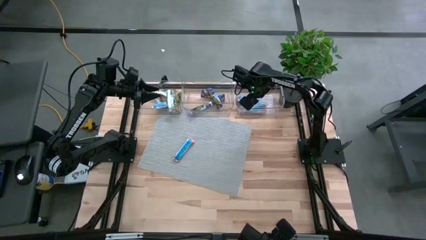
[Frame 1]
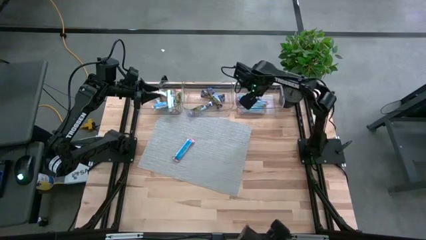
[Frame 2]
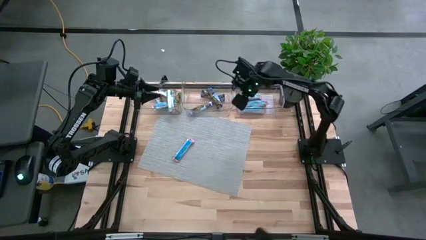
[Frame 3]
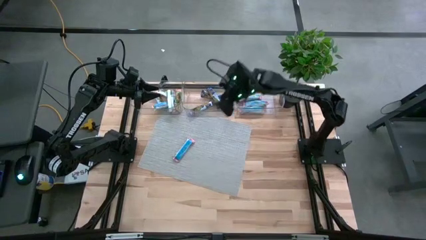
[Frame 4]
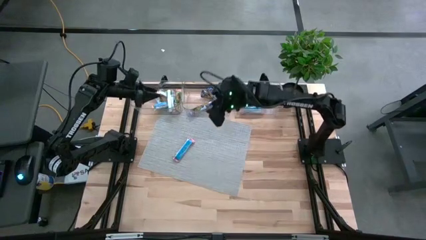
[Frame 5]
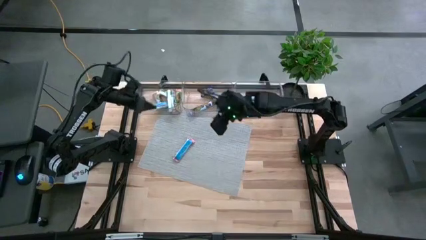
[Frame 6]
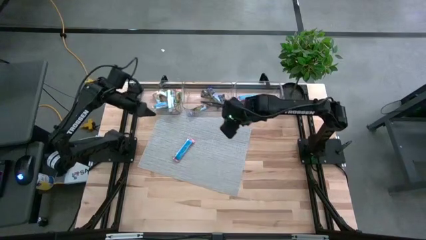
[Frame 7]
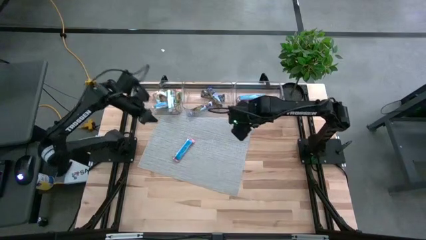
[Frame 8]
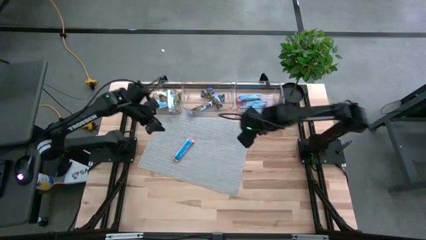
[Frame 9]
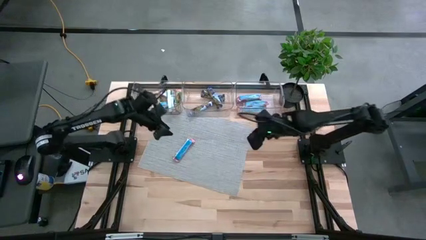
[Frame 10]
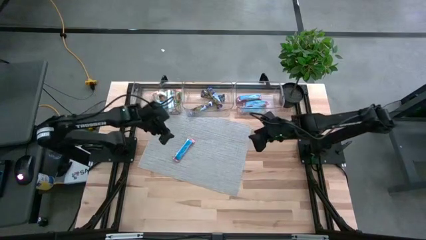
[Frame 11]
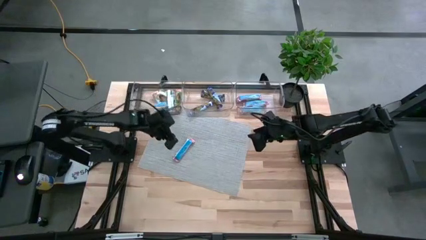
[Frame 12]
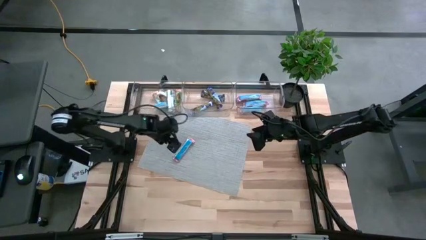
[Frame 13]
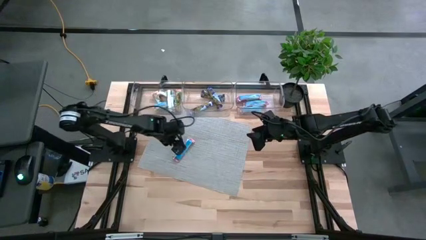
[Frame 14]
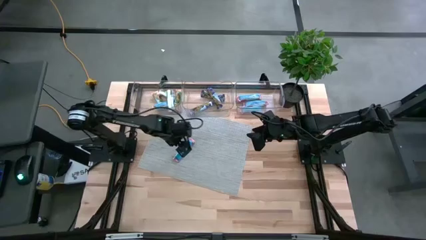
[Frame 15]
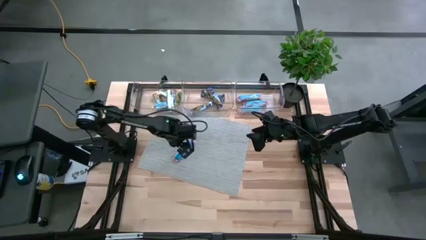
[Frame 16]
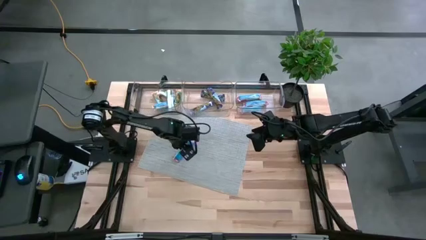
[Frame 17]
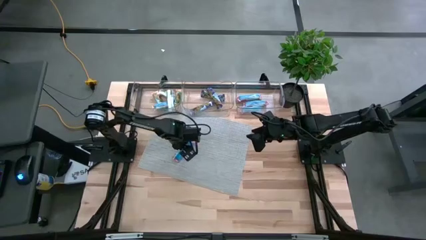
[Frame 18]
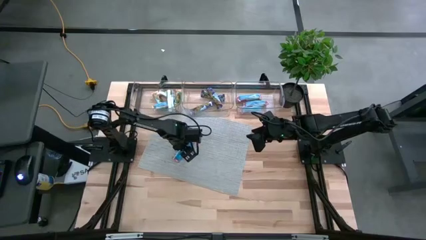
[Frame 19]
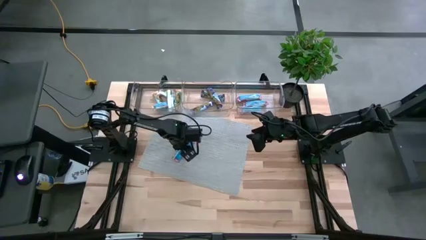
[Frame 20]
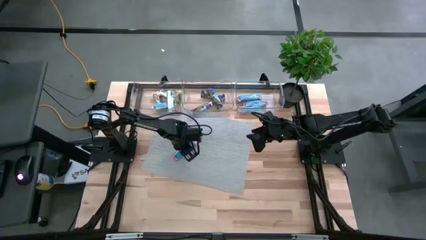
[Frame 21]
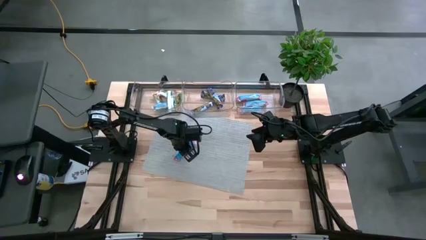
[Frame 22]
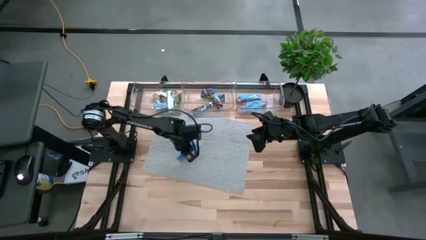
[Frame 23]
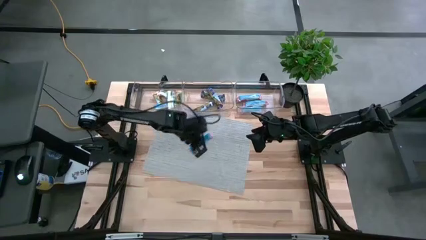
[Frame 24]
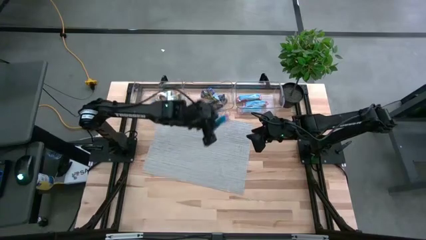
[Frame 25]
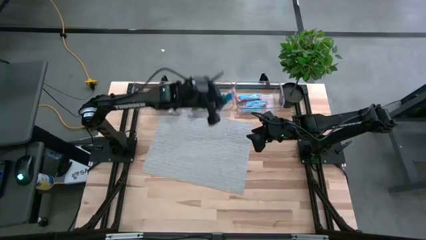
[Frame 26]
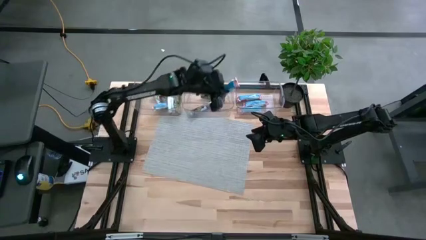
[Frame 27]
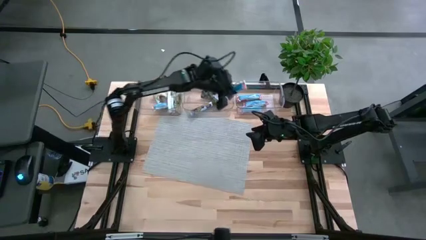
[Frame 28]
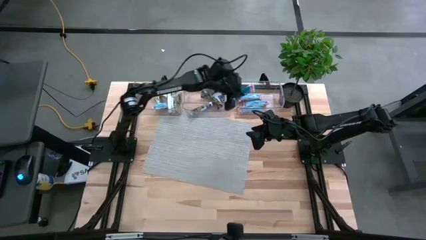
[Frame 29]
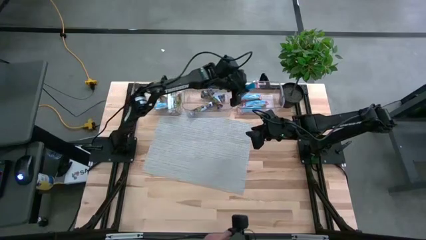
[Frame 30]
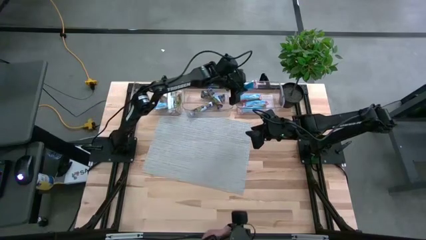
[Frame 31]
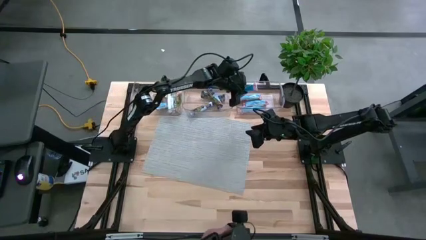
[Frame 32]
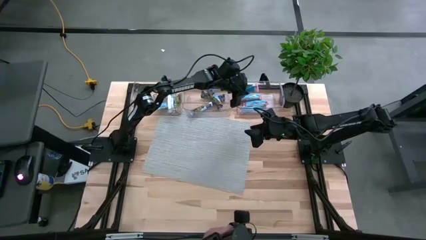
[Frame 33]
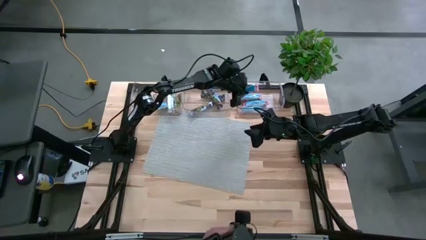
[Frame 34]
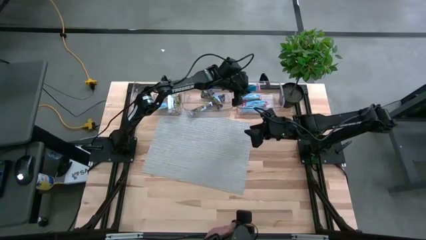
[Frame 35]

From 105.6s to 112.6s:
Task: Pick and place Granola Bars by type
Put the red granola bar into the right transparent bin

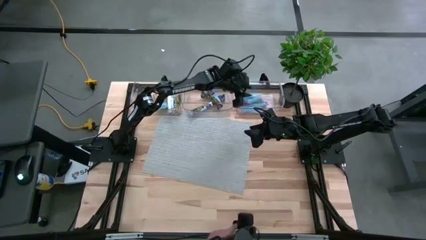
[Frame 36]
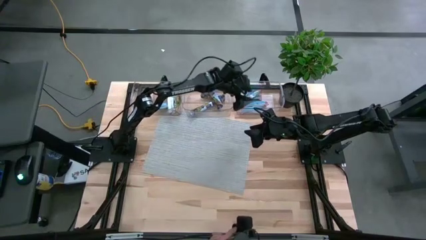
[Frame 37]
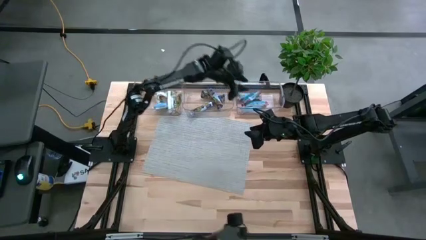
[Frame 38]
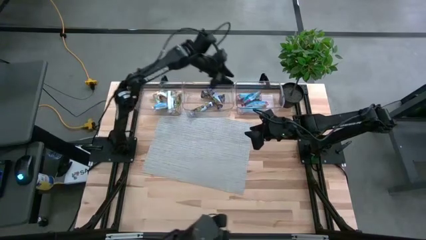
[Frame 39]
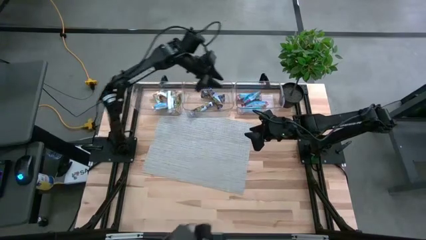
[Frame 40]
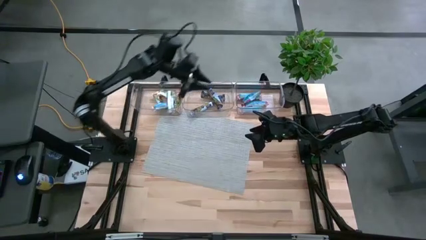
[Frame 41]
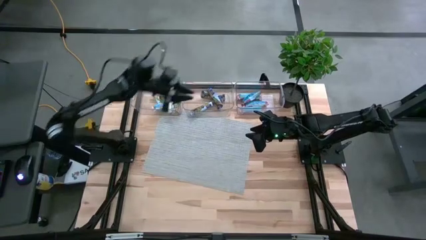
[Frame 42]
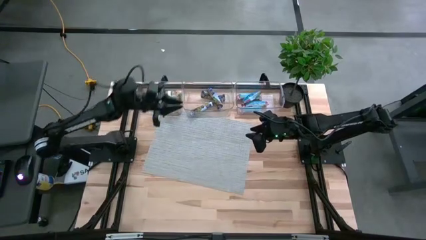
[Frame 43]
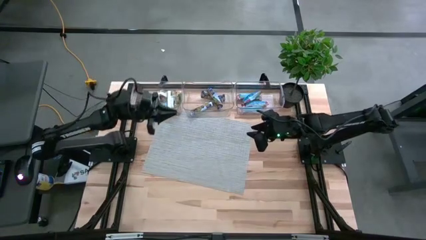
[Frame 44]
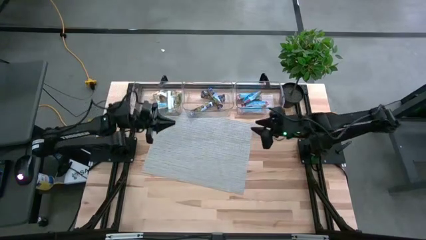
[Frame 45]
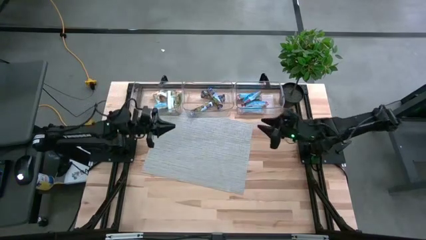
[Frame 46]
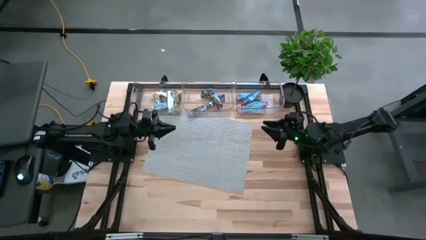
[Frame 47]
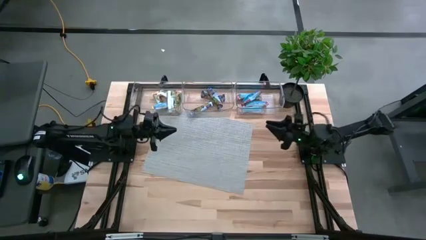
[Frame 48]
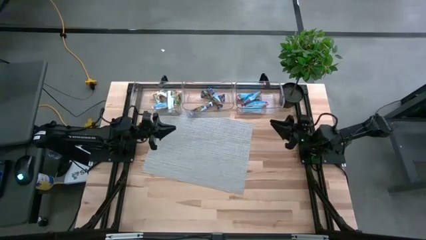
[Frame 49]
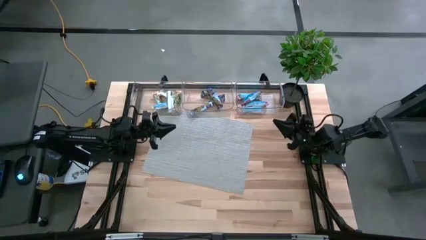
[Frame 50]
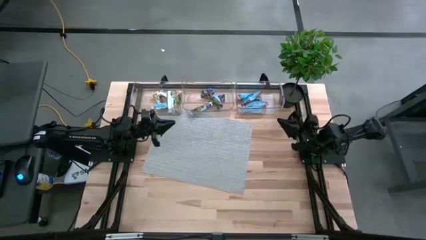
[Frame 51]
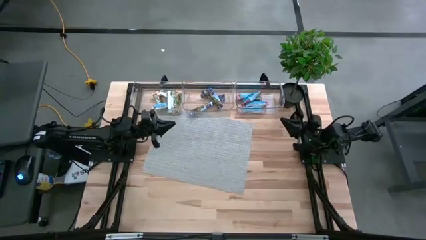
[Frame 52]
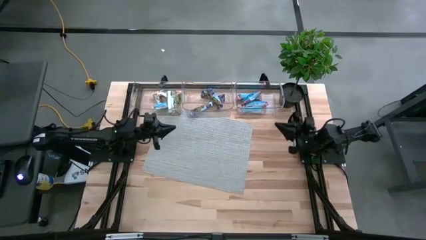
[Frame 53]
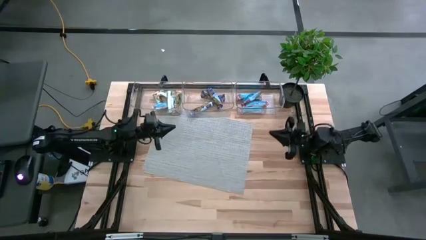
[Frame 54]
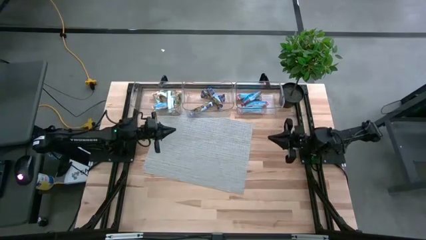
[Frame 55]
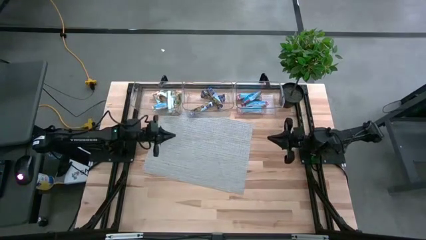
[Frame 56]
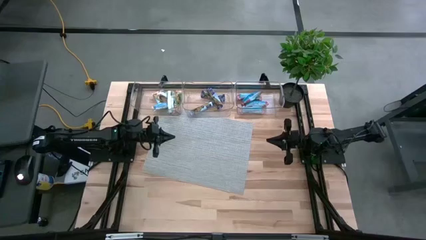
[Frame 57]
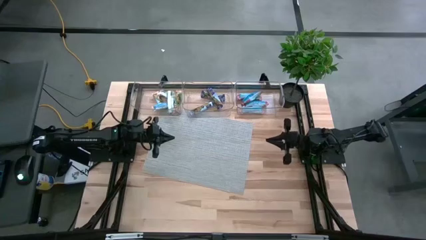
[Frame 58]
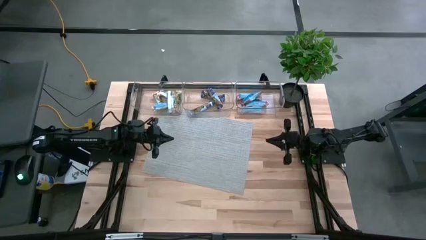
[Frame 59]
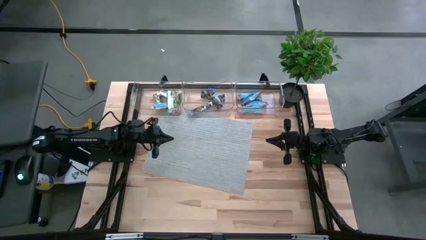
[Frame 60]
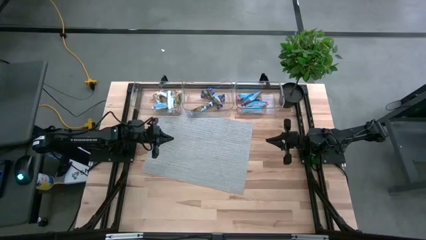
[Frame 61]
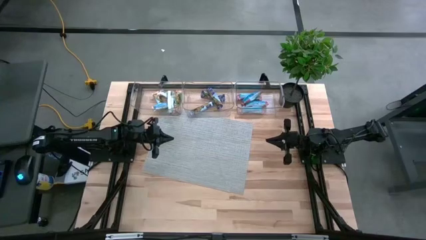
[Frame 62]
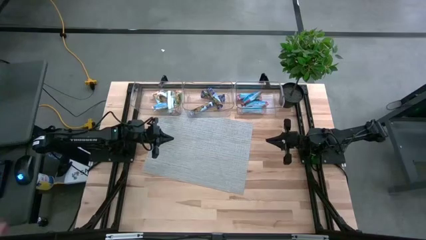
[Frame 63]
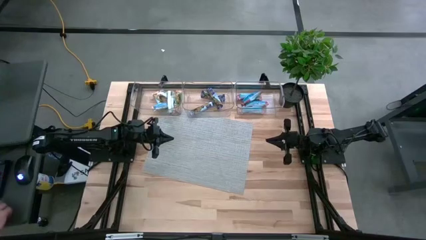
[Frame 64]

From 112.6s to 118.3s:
Return to Home Position
